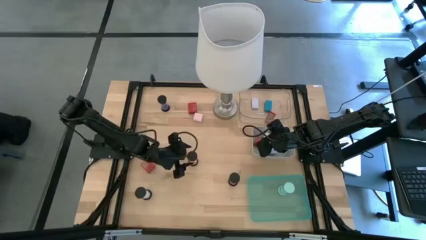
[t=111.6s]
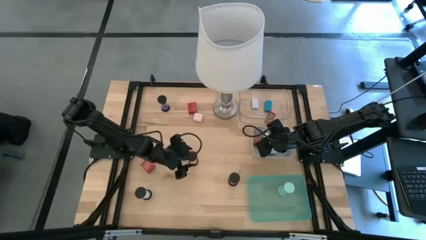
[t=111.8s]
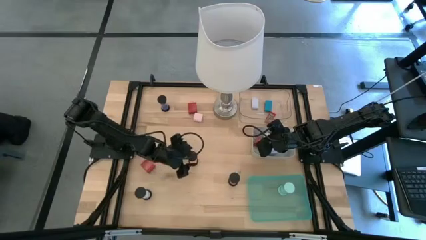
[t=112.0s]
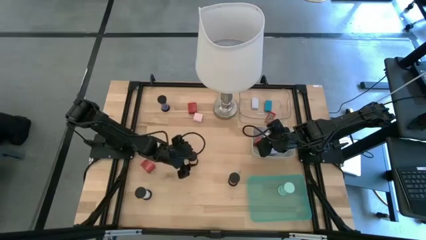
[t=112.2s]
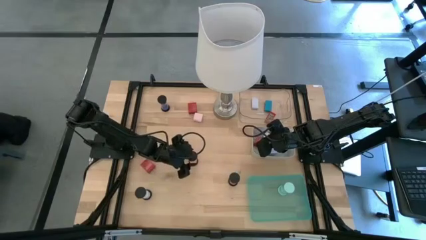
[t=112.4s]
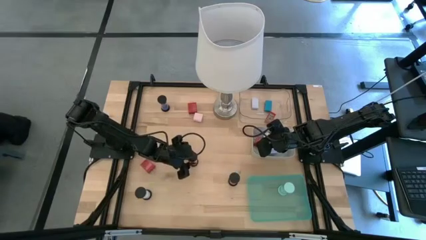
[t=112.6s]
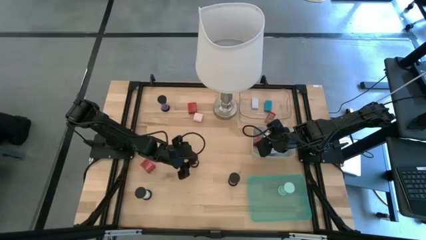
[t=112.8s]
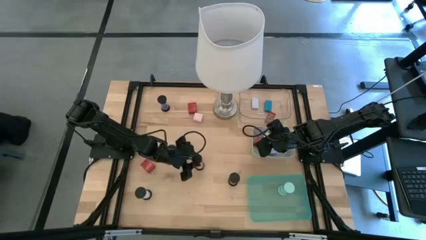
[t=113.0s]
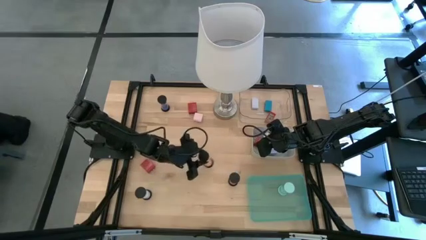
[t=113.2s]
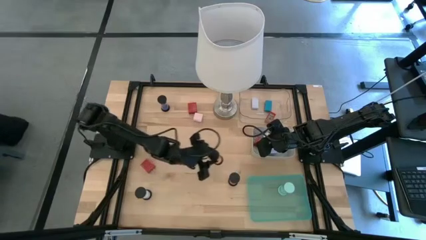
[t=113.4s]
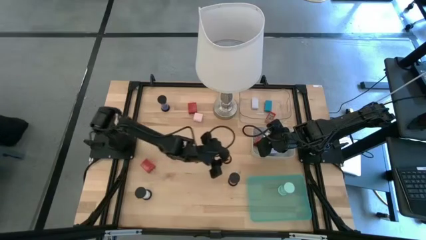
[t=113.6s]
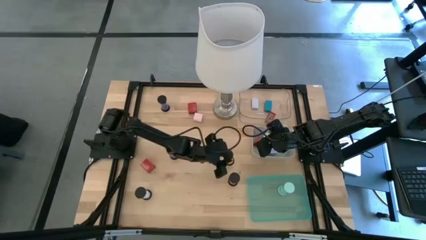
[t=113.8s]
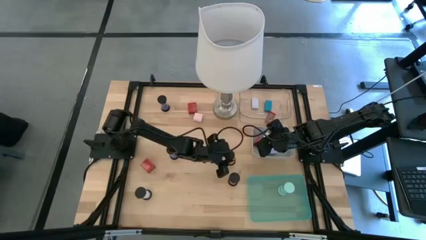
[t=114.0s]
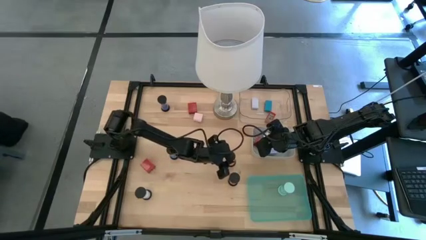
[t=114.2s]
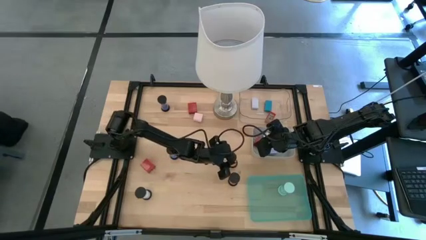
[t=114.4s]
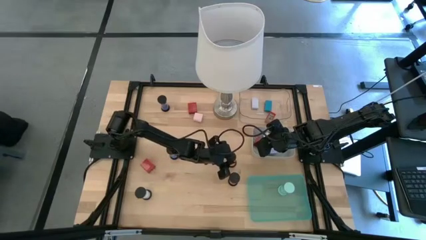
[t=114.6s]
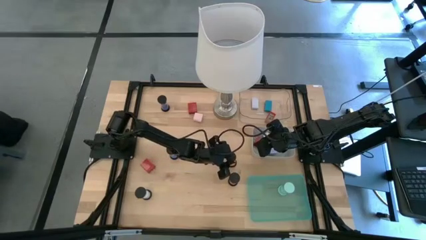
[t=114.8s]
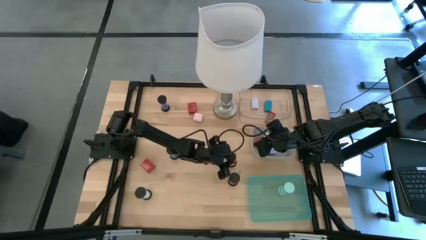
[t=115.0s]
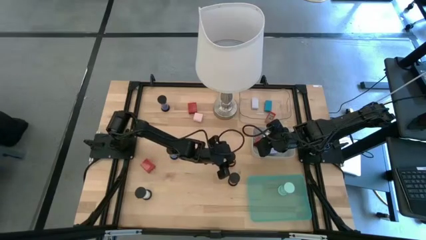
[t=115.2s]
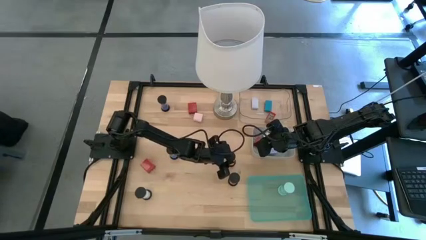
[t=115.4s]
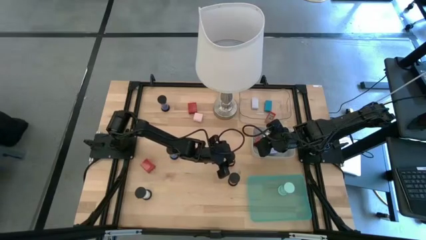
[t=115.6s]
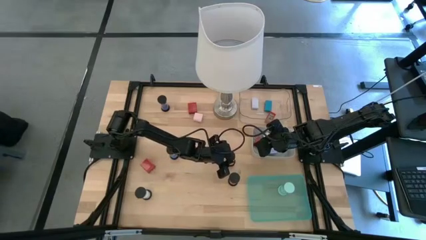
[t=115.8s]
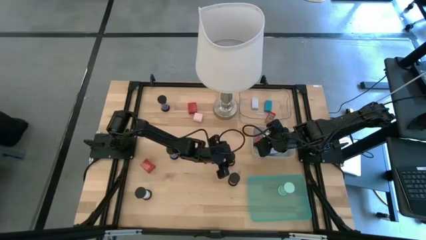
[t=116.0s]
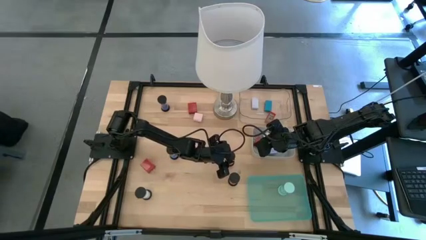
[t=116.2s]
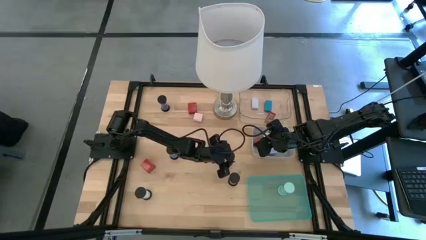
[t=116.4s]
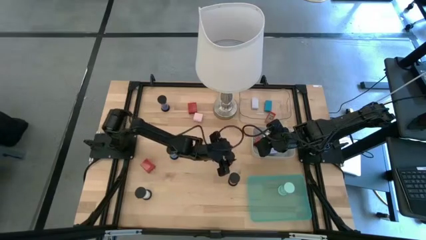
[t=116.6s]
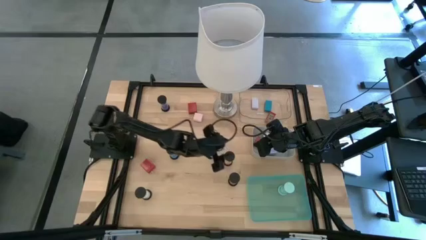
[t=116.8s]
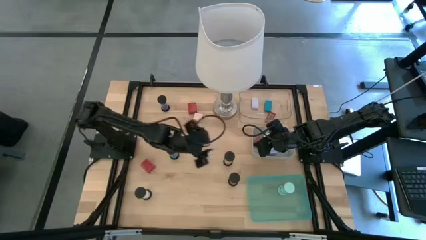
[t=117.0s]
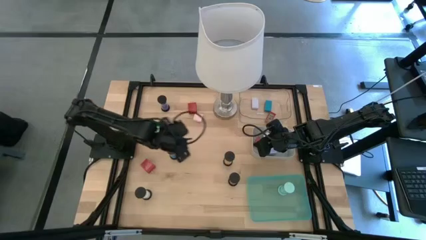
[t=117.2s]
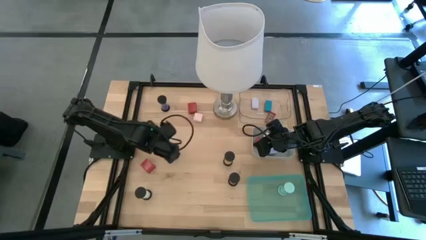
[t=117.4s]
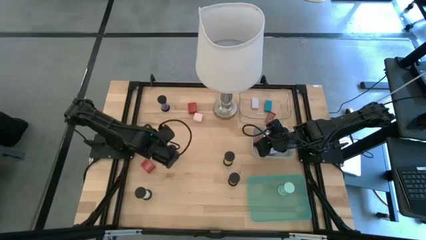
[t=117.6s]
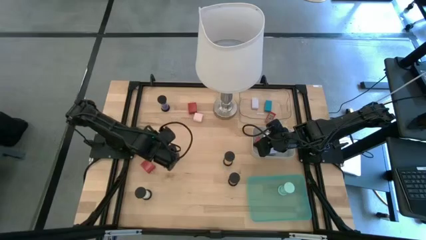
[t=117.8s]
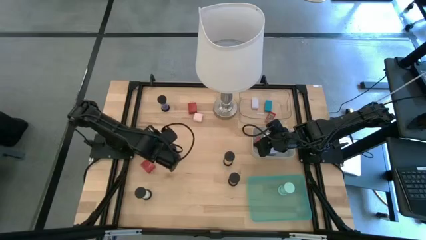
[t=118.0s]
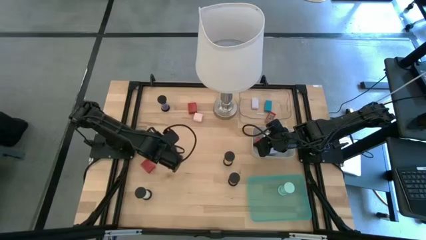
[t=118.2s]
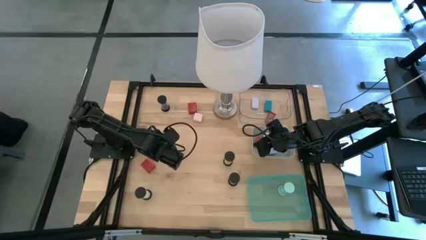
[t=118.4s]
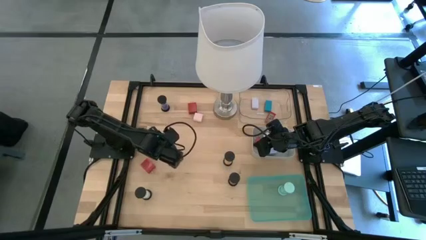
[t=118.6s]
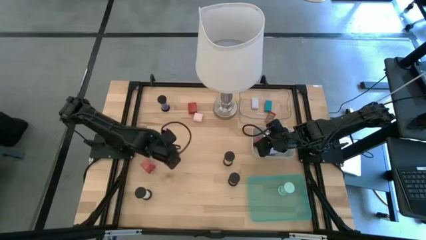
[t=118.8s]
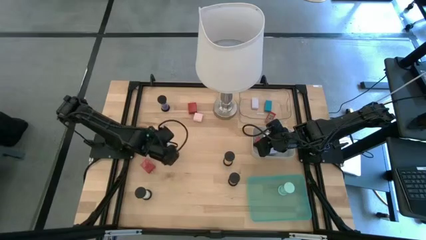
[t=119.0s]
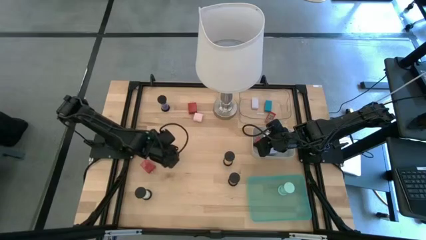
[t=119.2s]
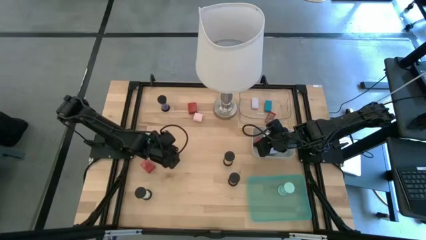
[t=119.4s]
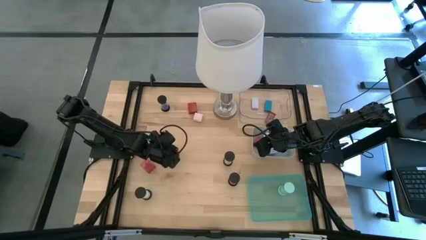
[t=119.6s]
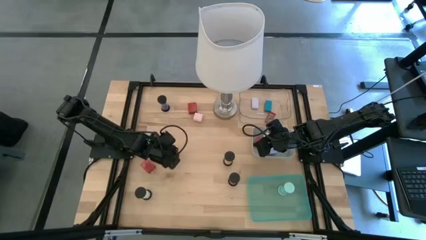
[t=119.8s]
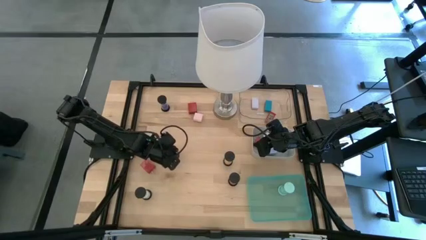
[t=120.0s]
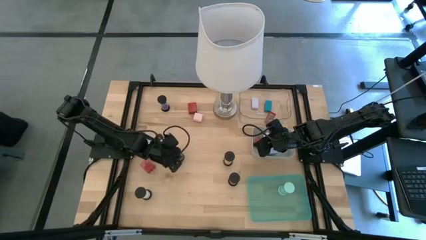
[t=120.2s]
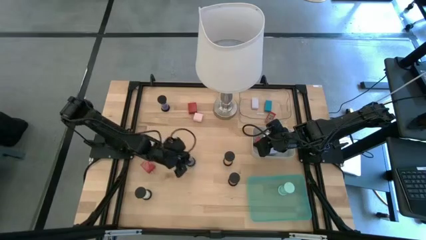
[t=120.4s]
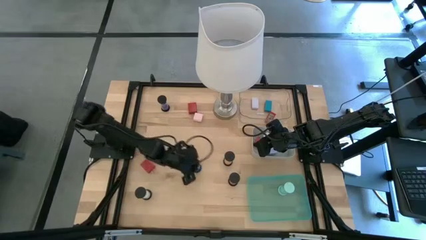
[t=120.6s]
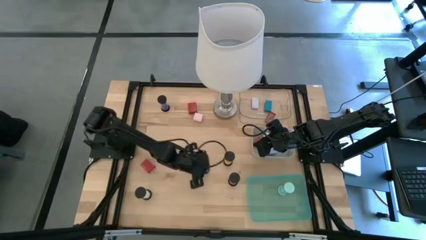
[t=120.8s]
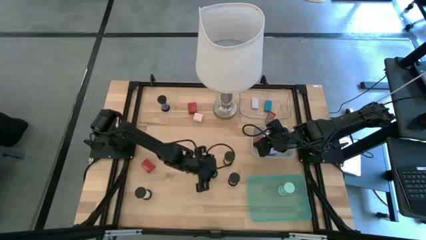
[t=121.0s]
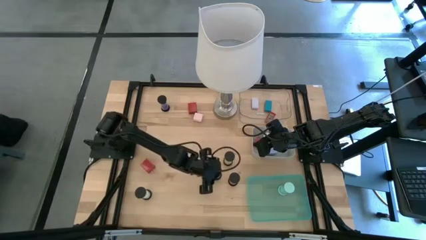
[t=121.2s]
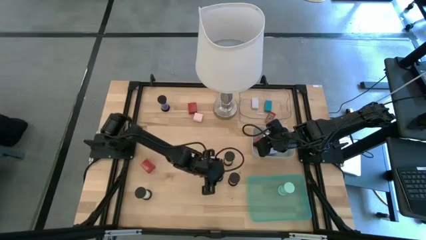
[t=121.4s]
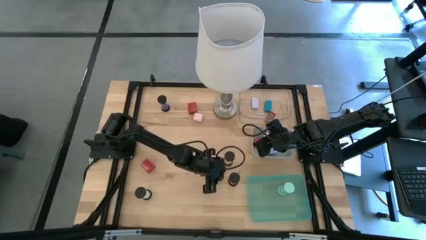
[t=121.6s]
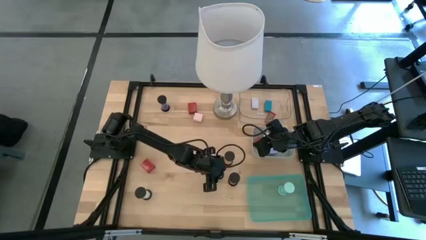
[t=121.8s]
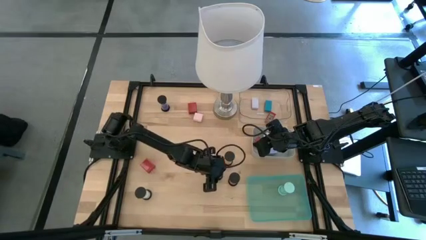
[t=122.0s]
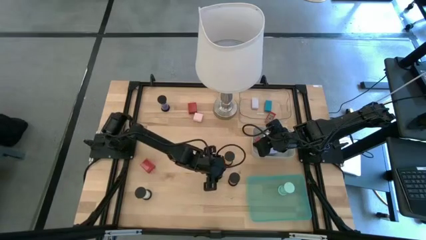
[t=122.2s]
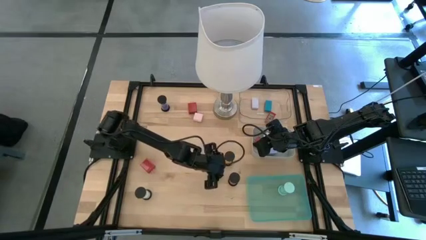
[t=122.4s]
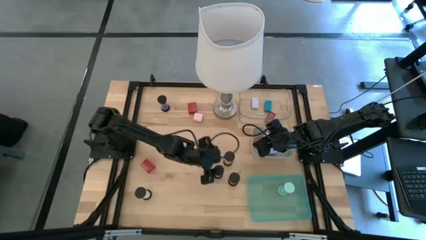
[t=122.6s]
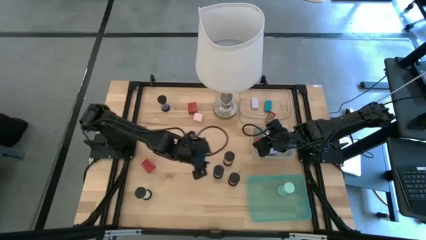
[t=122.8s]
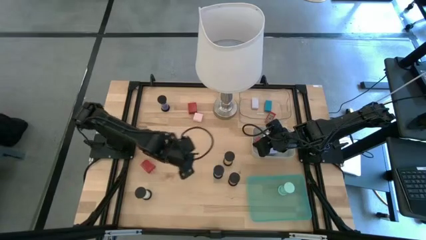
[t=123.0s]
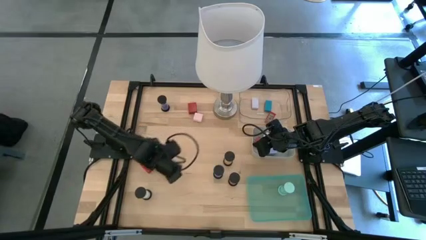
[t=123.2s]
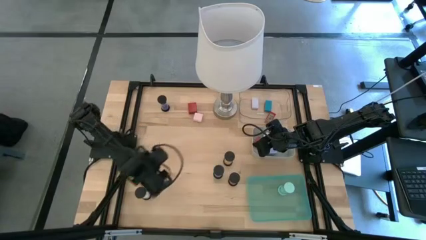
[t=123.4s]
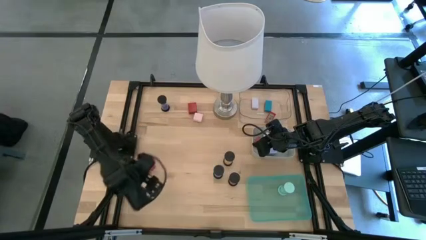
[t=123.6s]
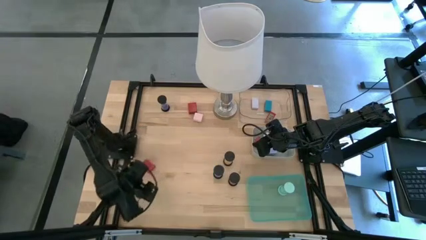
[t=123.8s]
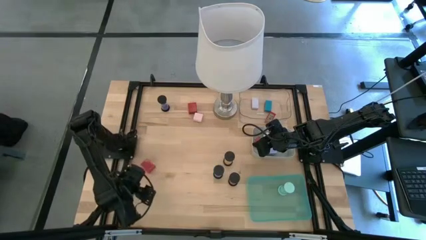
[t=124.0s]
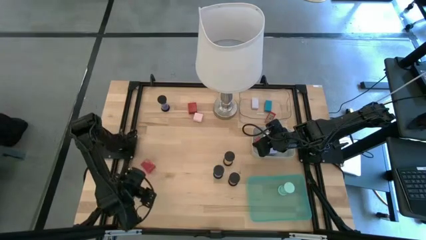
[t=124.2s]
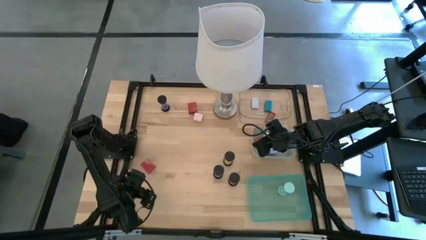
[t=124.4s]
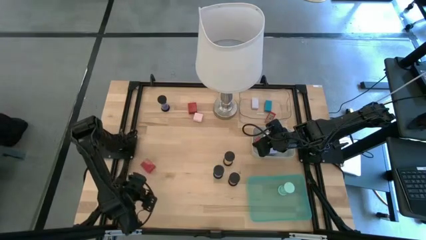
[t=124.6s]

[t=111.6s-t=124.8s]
Task: Pick & Place Office items
Move the hourglasses to the middle of the table
